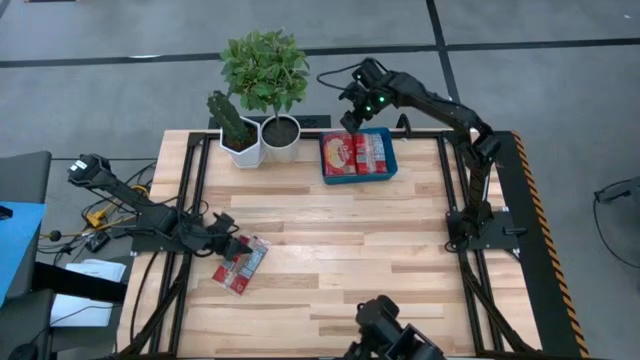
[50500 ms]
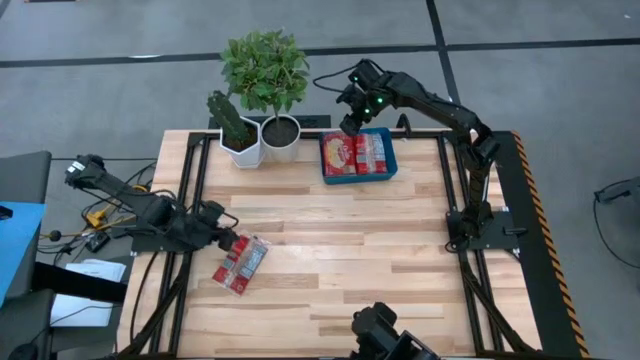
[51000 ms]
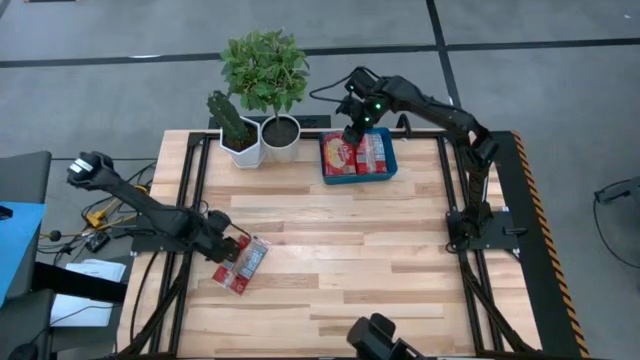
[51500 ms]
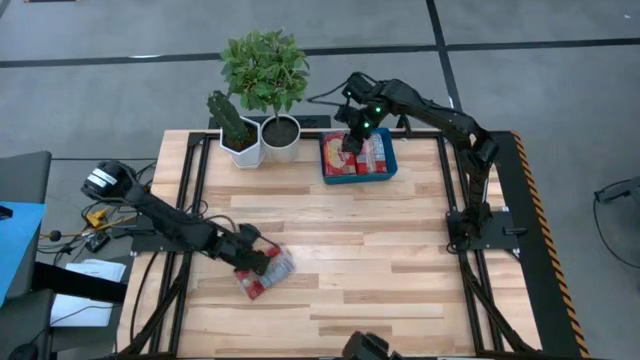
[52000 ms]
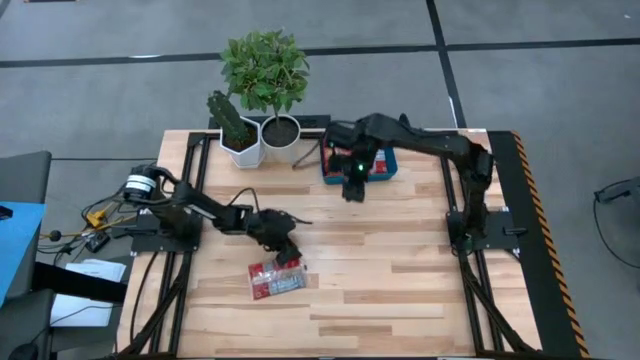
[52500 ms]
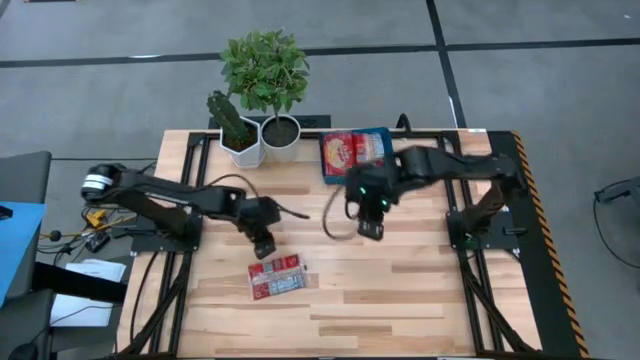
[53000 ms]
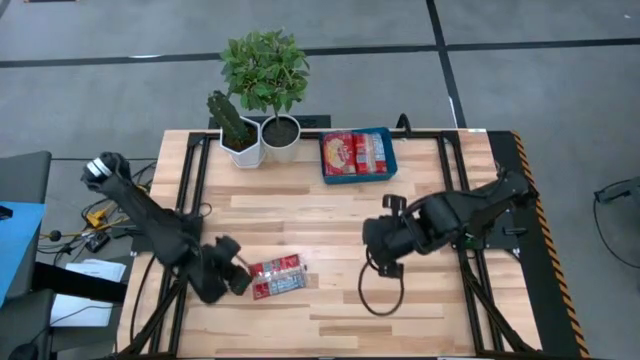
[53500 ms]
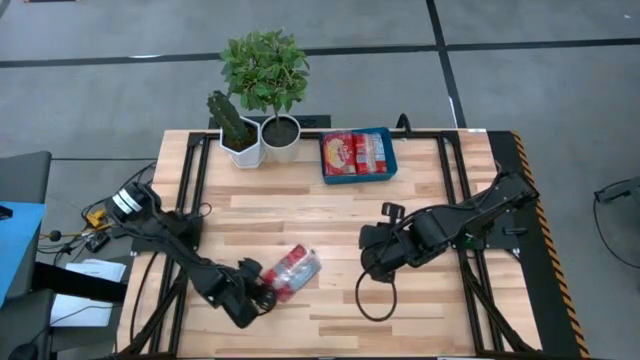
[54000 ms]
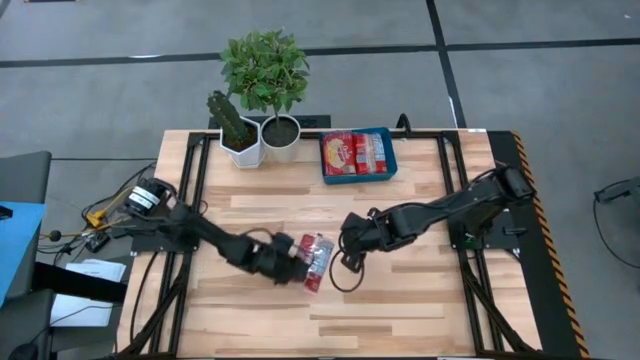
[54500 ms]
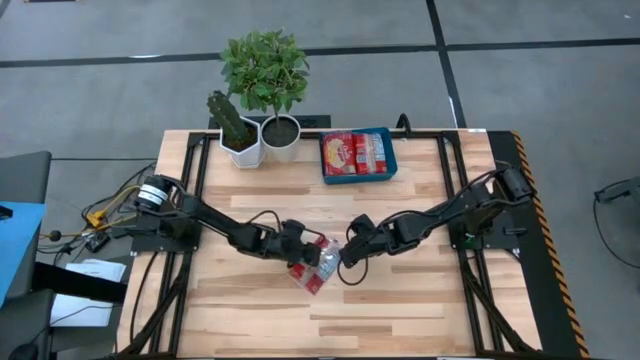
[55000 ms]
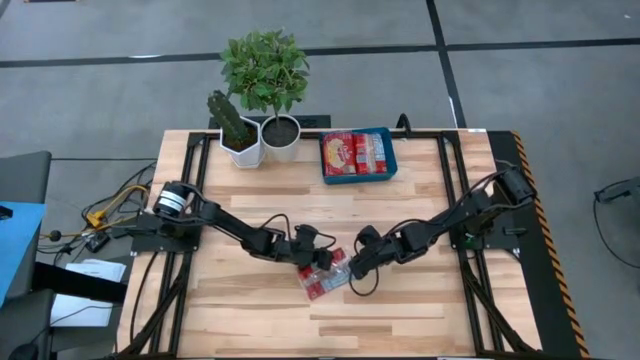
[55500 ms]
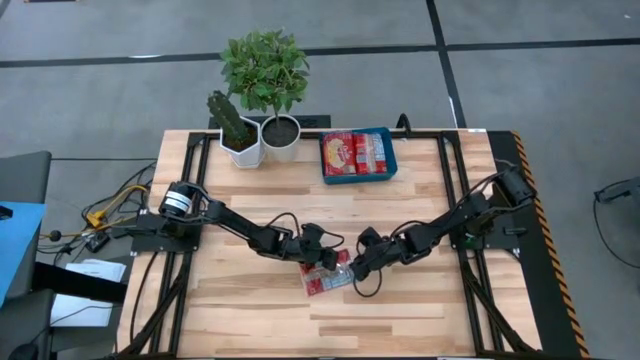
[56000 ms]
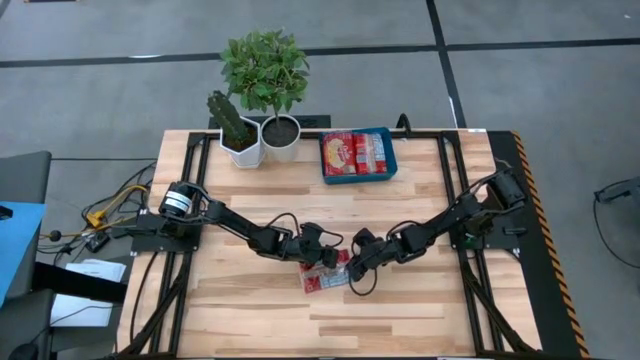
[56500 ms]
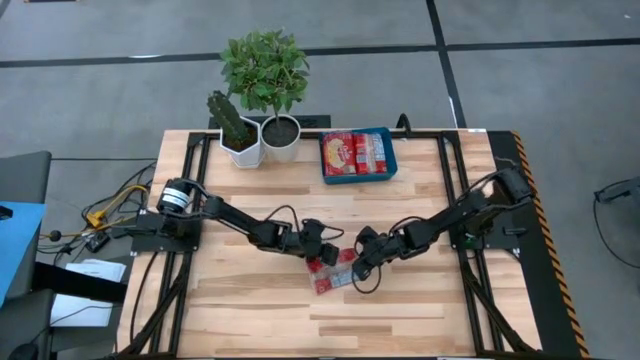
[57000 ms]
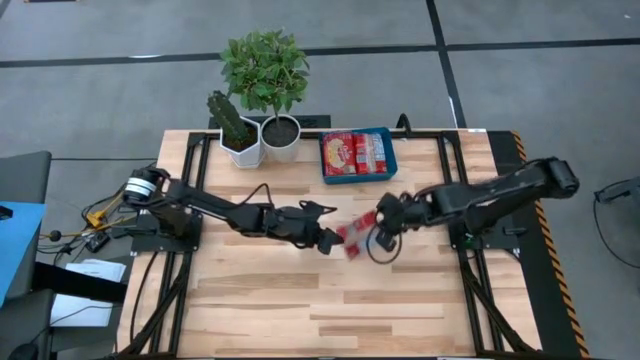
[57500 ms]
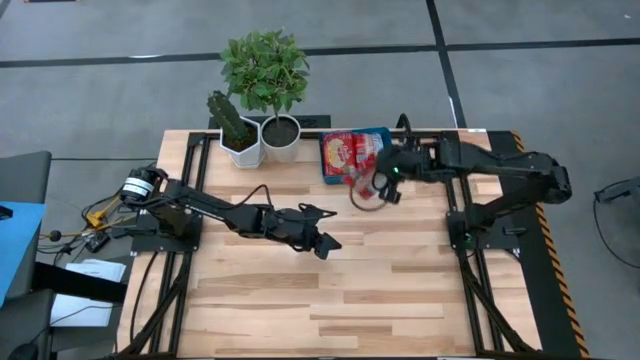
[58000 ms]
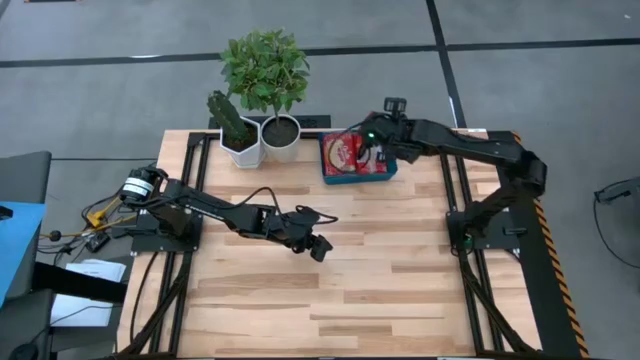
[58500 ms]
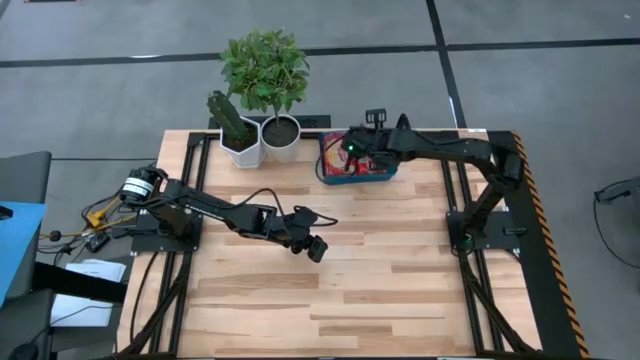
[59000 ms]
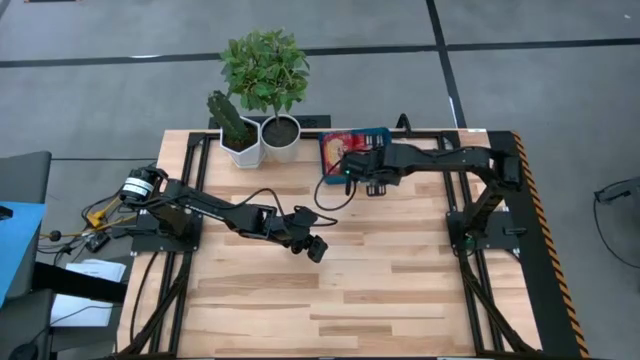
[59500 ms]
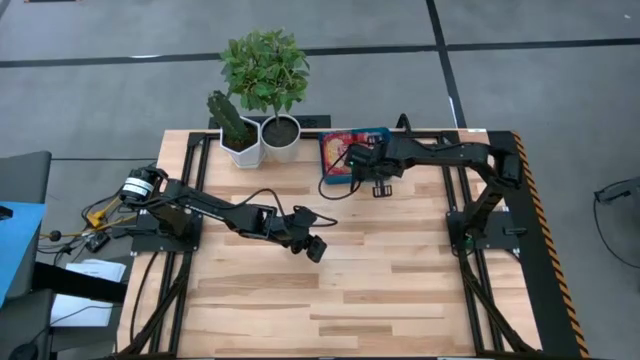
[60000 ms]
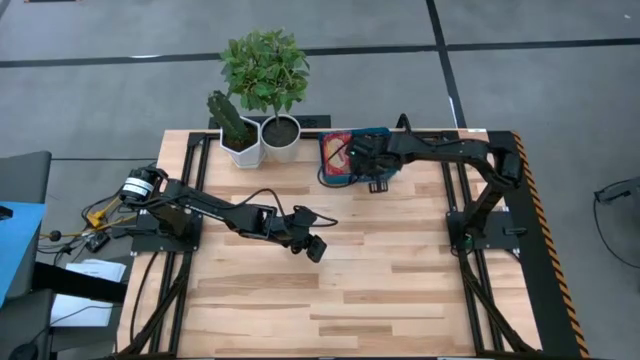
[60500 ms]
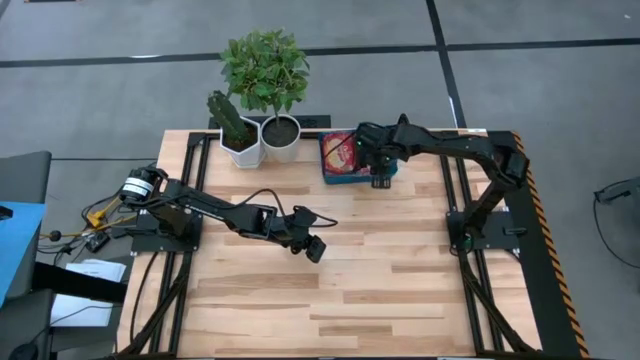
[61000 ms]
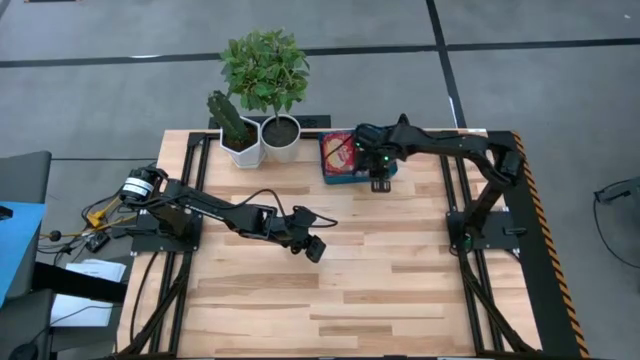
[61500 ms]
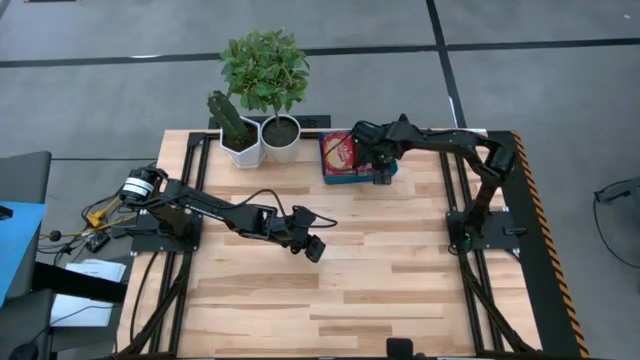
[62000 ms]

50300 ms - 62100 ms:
Task: Sort popcorn bags into baskets
Put the red popcorn bag into the blue container

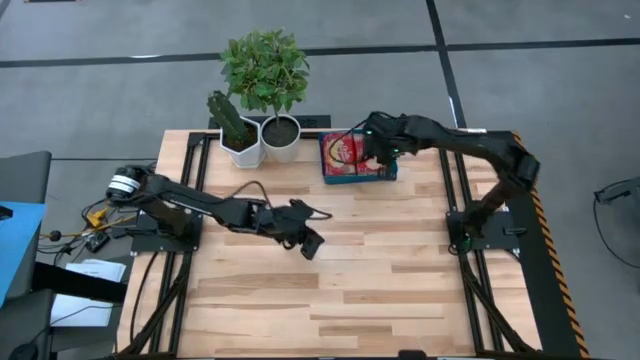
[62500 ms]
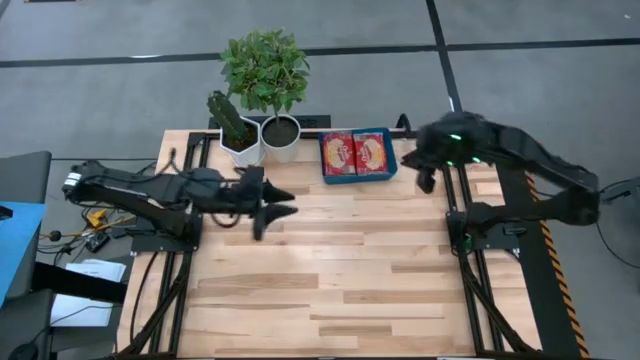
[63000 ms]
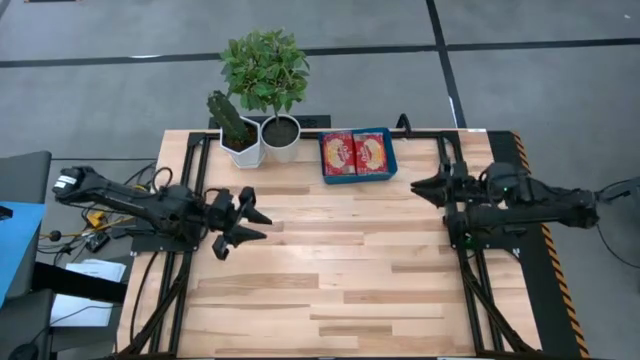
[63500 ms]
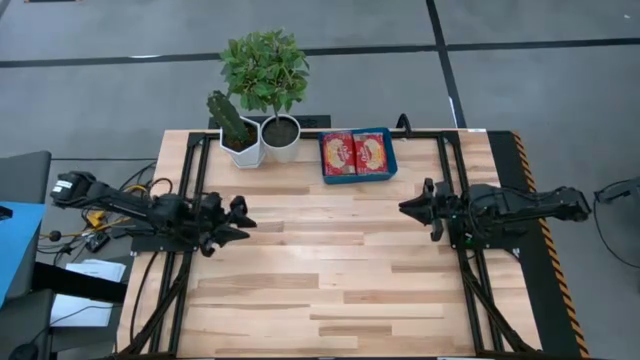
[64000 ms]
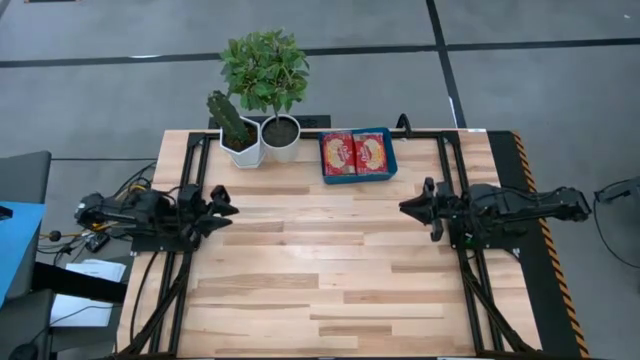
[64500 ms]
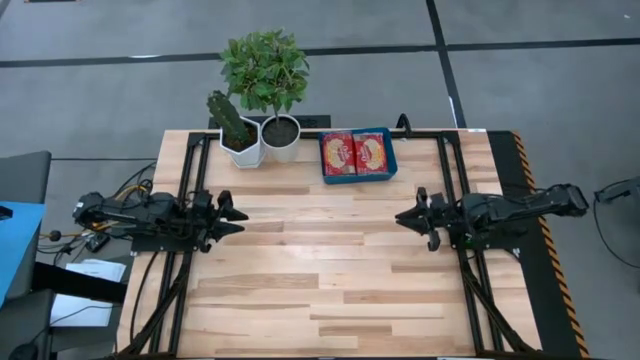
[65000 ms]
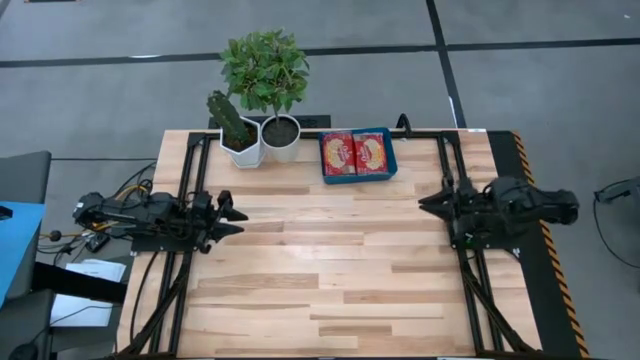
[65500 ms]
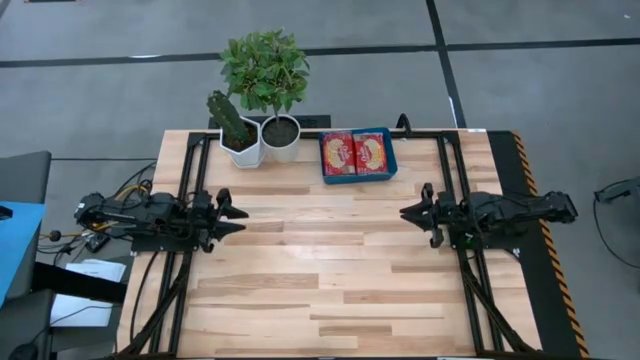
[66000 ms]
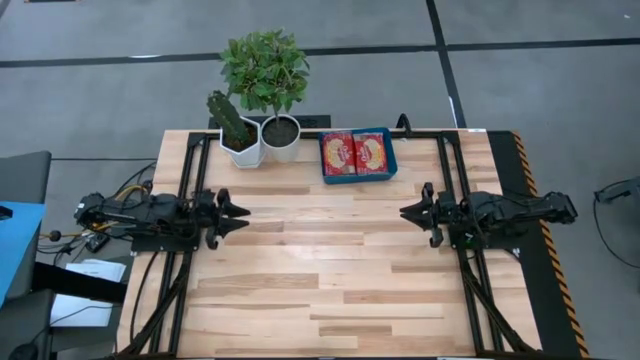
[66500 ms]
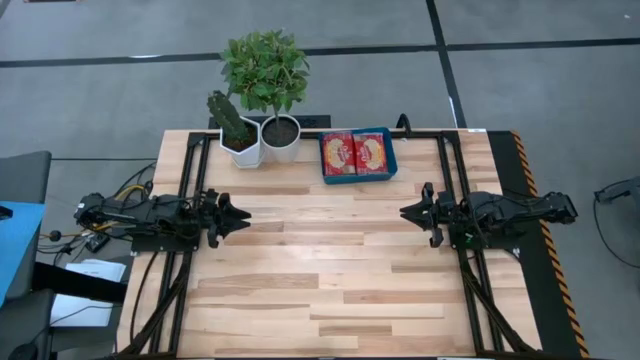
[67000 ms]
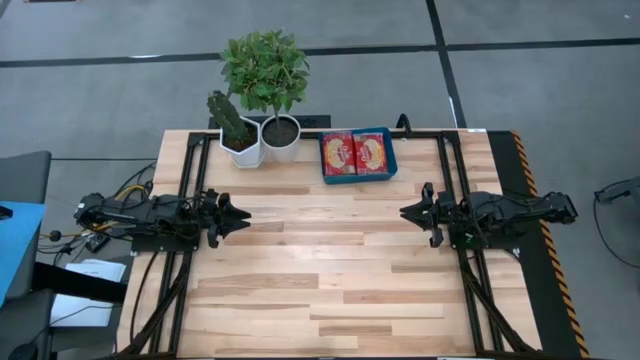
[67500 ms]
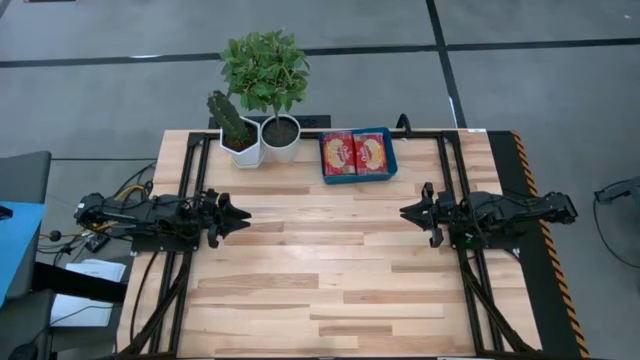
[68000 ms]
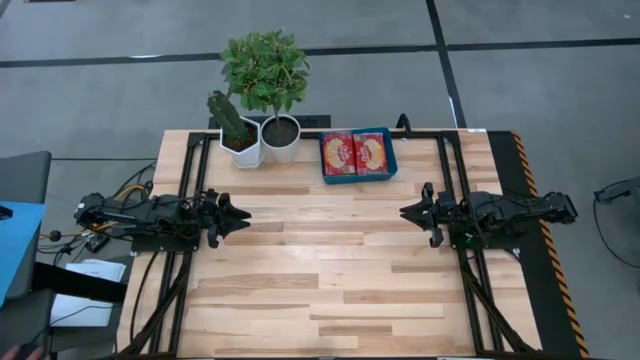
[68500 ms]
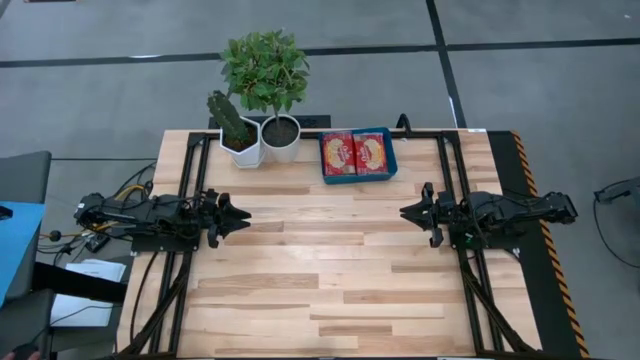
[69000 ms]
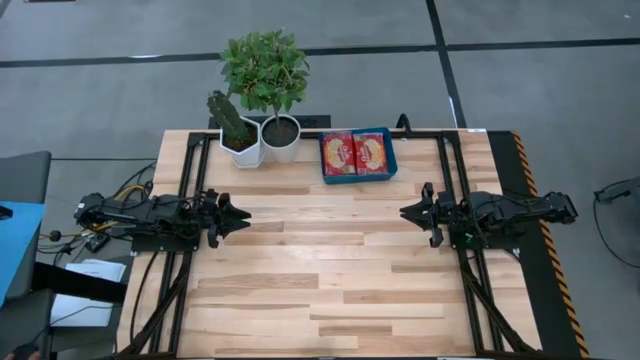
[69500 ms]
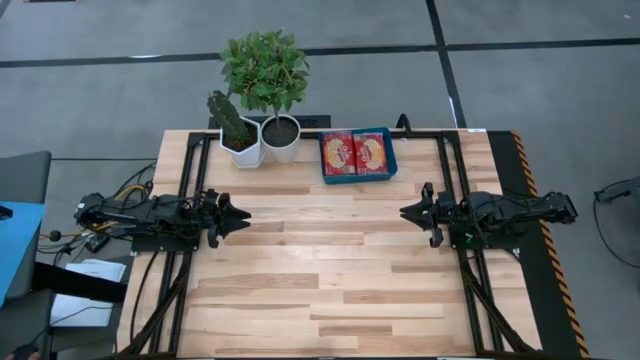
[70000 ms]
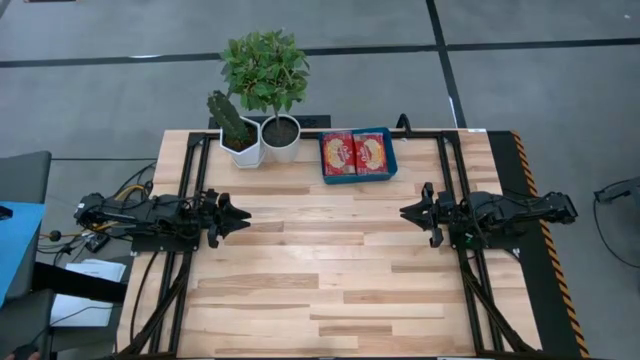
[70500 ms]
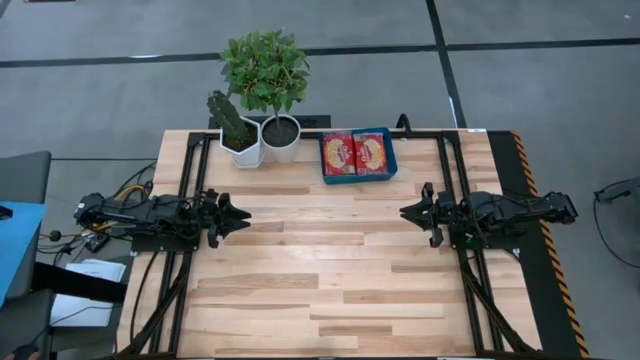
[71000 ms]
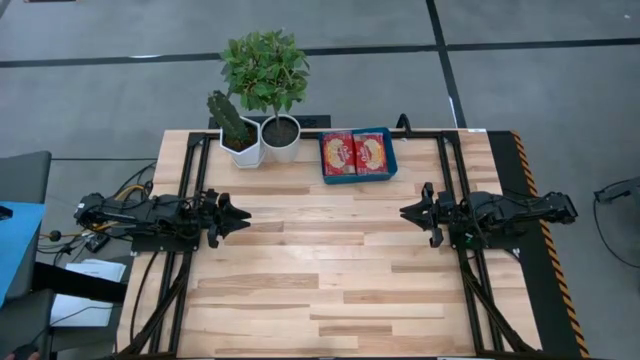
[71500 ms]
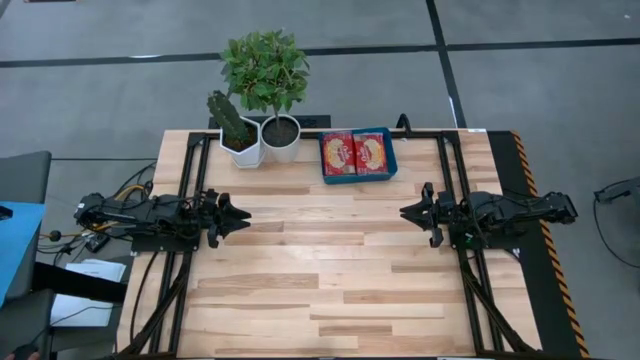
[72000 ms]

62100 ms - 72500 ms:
Return to Home Position
